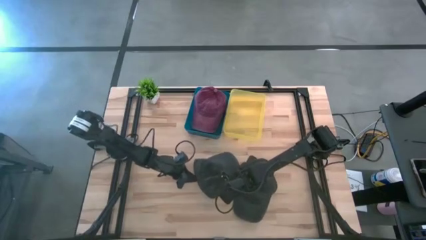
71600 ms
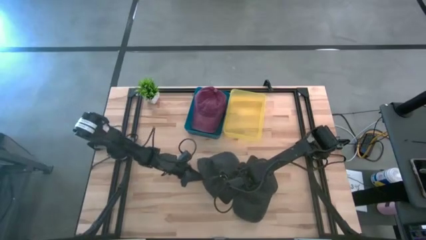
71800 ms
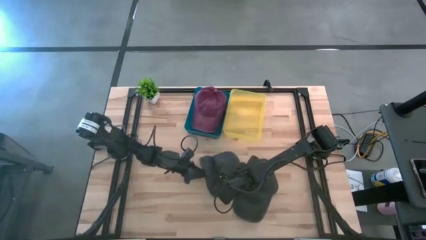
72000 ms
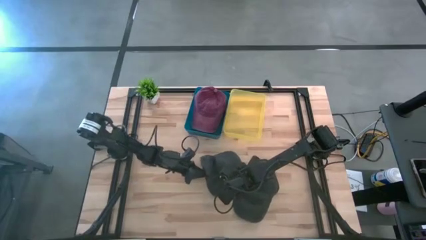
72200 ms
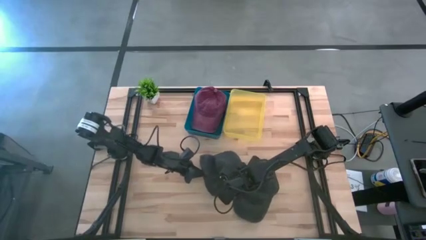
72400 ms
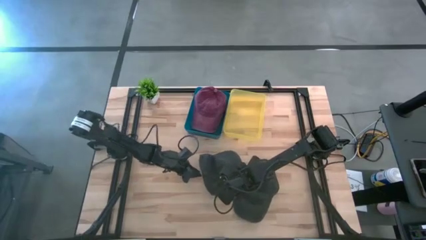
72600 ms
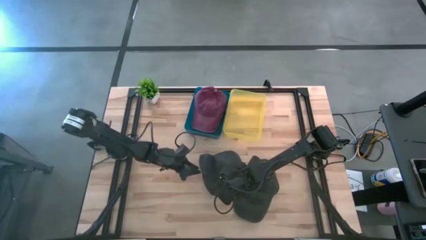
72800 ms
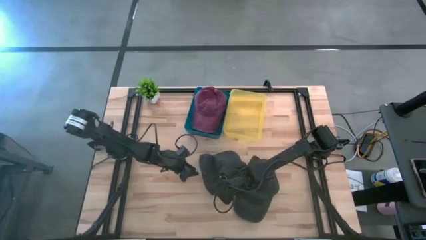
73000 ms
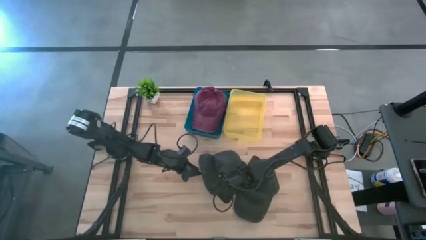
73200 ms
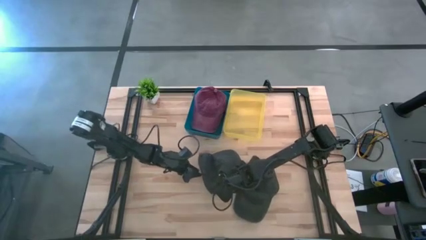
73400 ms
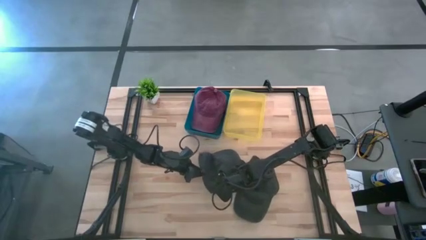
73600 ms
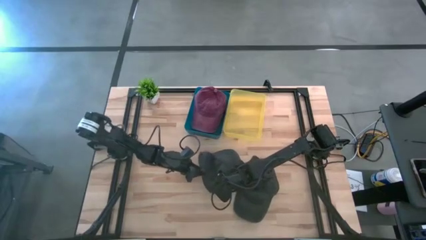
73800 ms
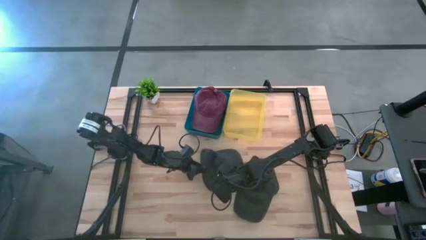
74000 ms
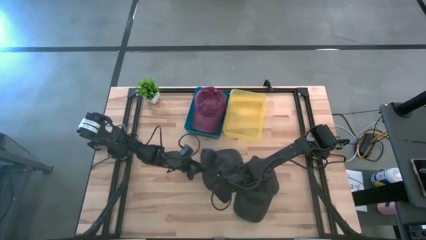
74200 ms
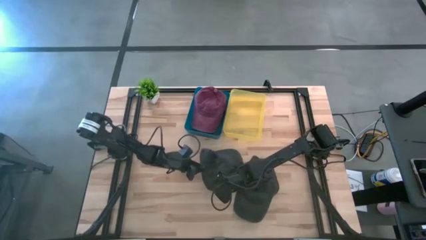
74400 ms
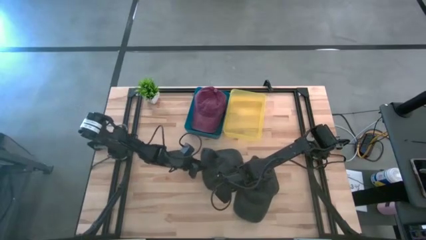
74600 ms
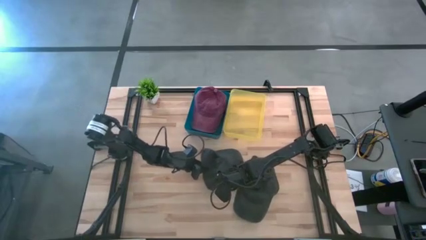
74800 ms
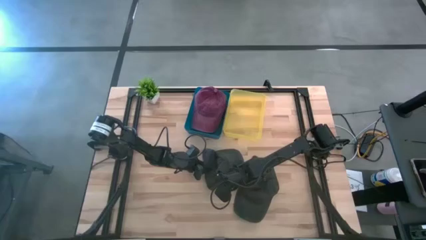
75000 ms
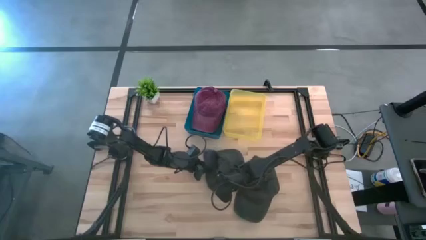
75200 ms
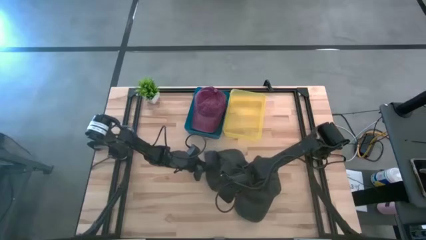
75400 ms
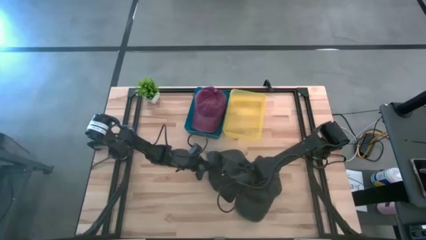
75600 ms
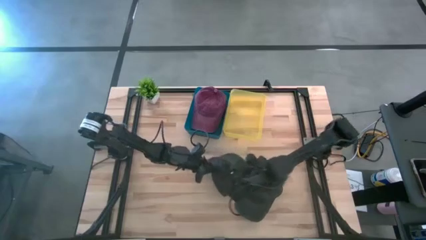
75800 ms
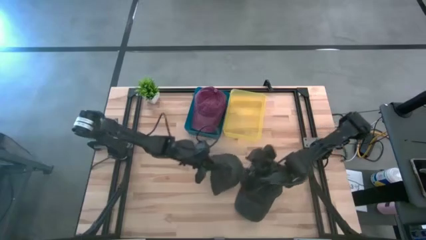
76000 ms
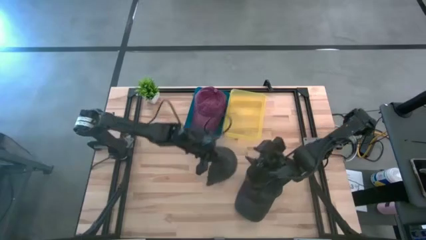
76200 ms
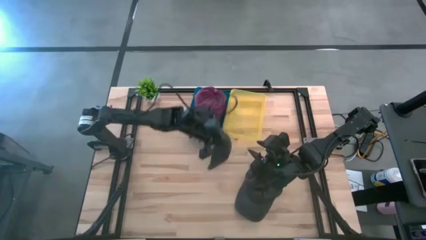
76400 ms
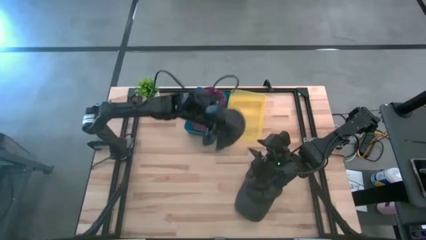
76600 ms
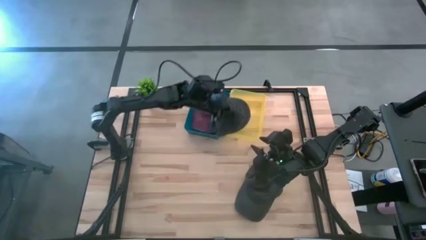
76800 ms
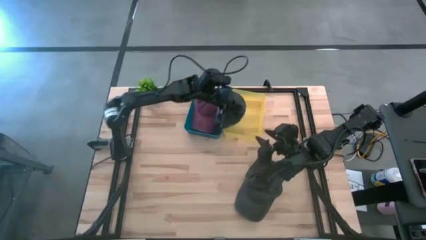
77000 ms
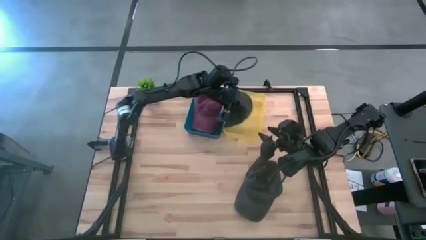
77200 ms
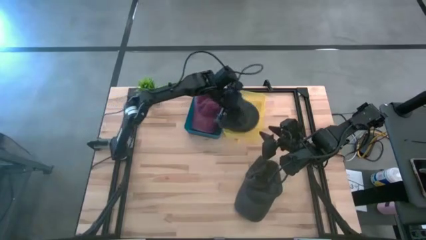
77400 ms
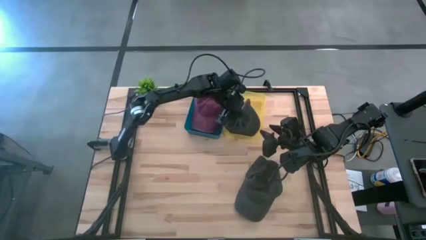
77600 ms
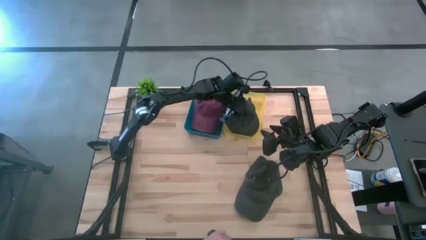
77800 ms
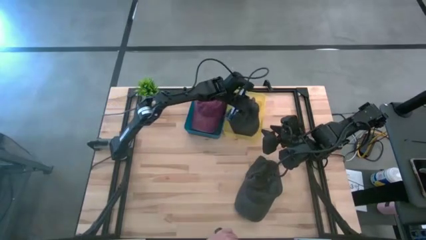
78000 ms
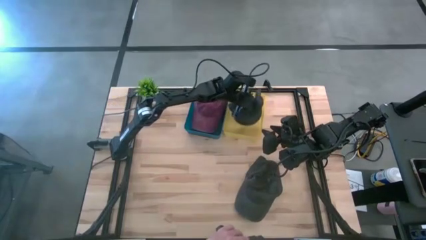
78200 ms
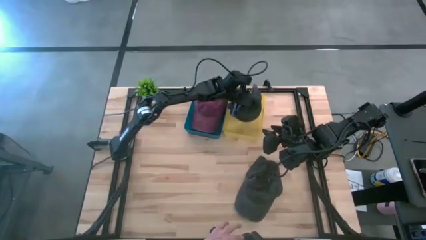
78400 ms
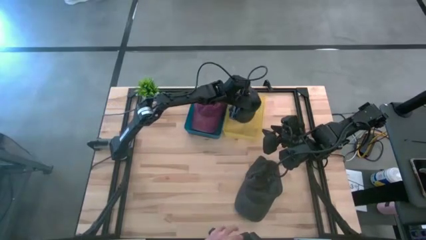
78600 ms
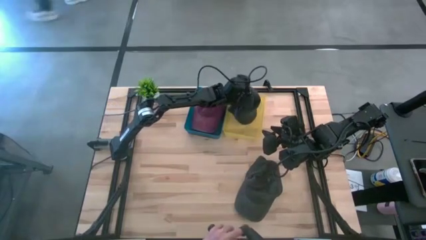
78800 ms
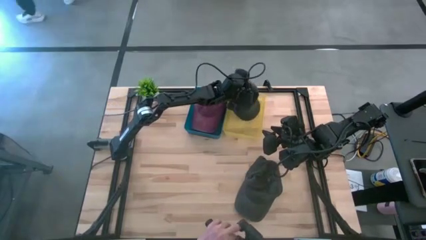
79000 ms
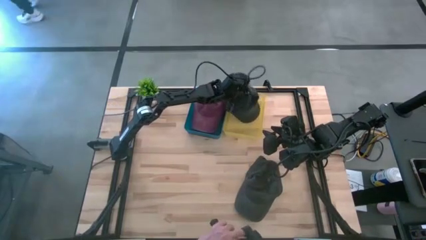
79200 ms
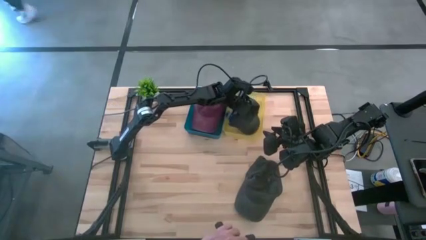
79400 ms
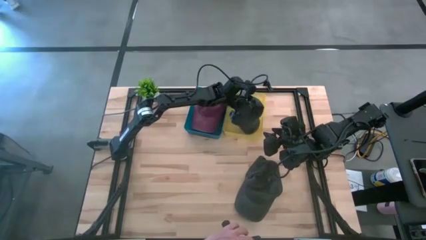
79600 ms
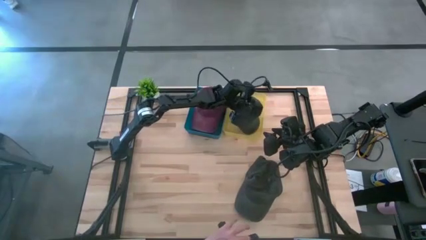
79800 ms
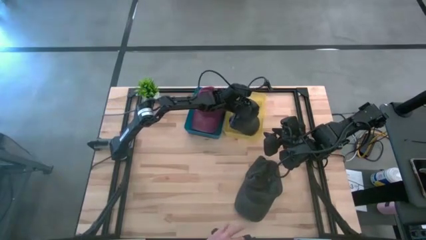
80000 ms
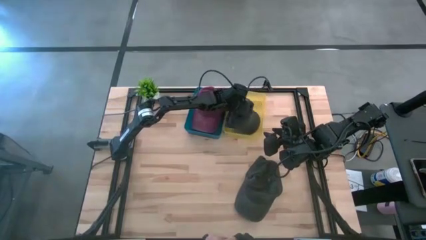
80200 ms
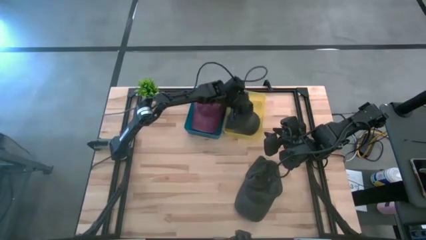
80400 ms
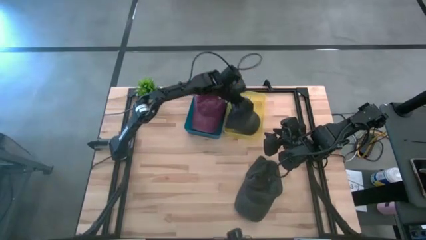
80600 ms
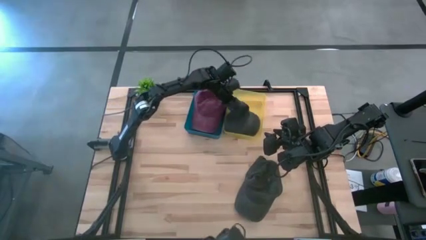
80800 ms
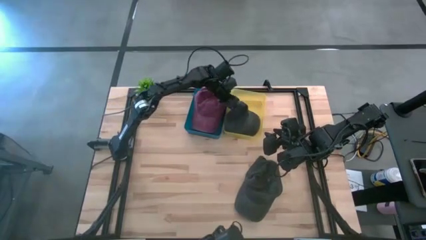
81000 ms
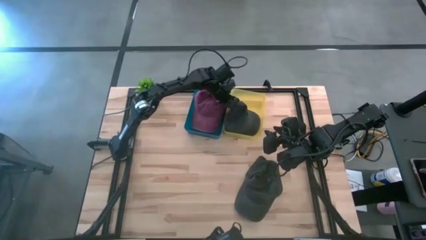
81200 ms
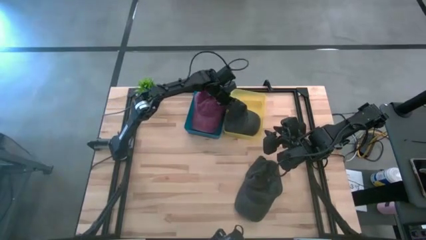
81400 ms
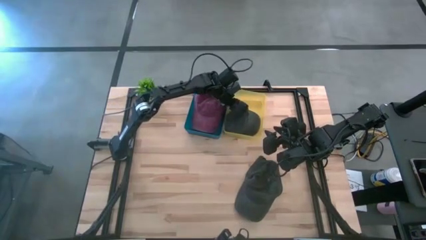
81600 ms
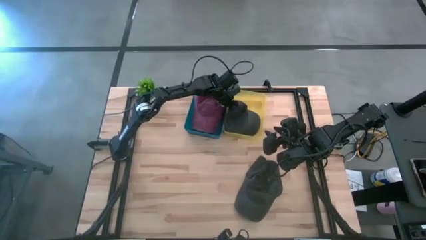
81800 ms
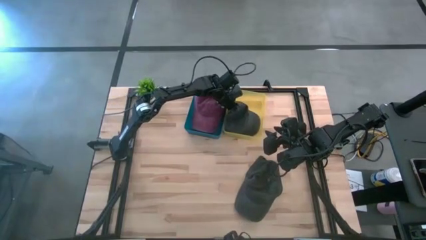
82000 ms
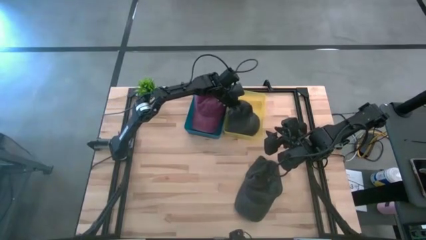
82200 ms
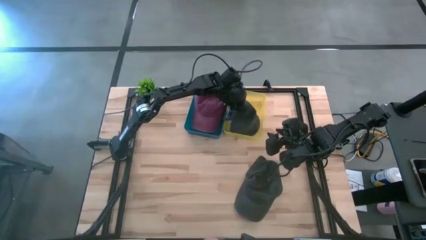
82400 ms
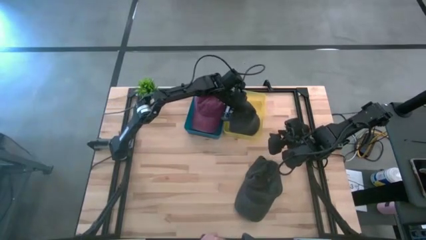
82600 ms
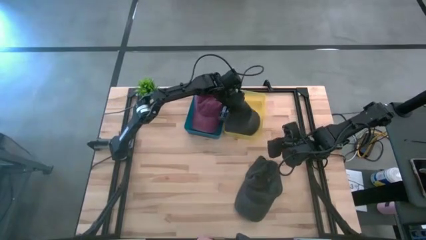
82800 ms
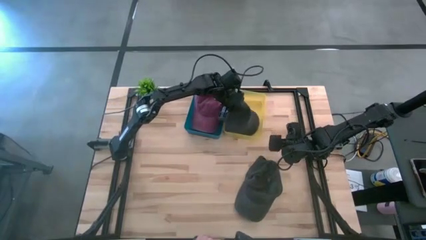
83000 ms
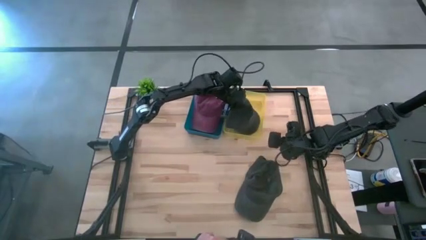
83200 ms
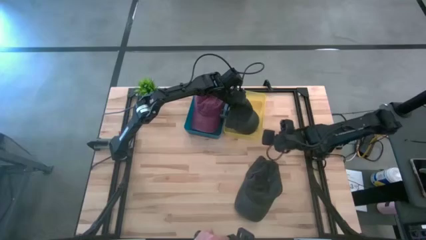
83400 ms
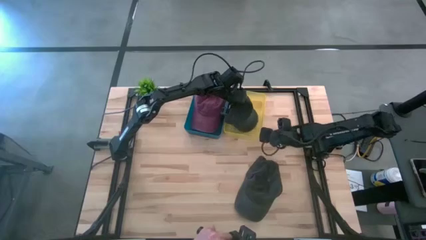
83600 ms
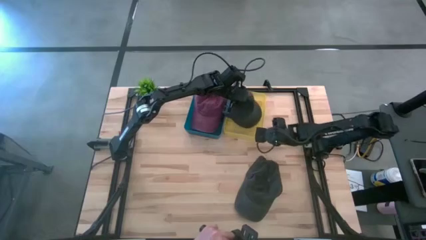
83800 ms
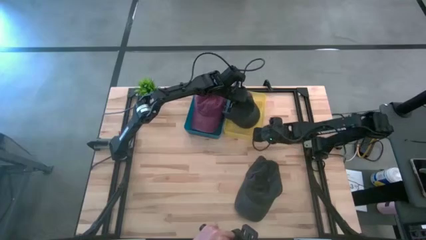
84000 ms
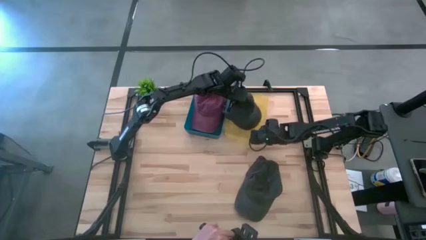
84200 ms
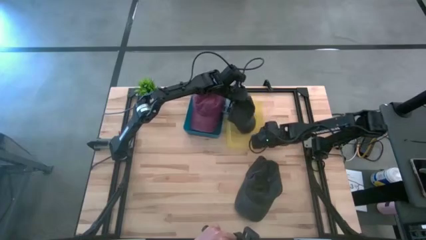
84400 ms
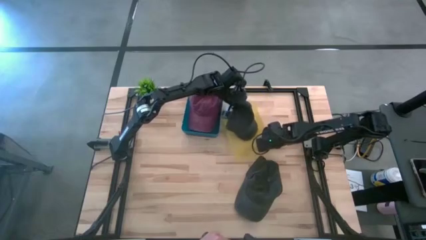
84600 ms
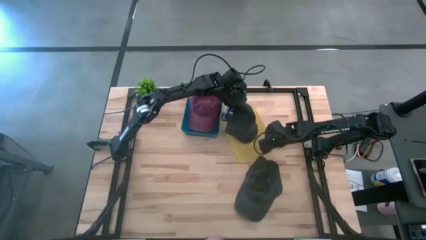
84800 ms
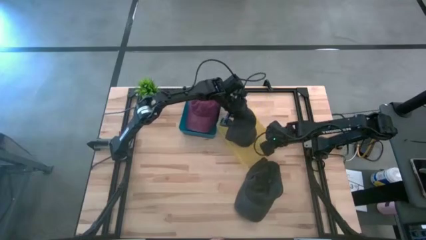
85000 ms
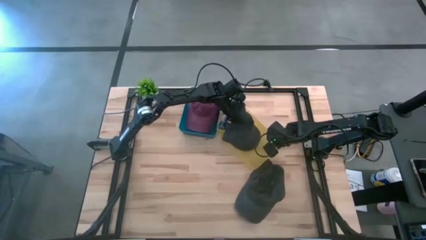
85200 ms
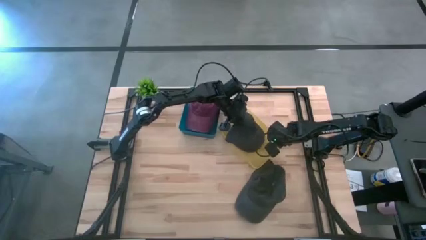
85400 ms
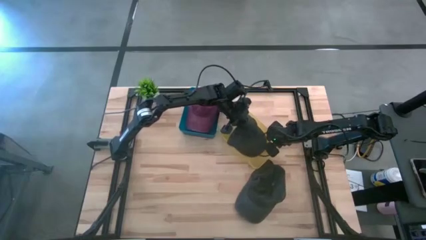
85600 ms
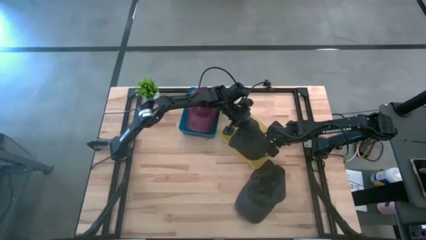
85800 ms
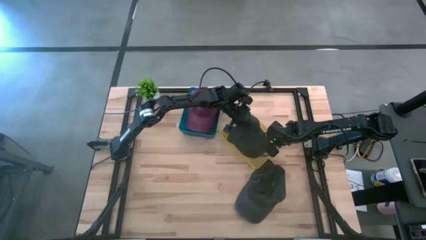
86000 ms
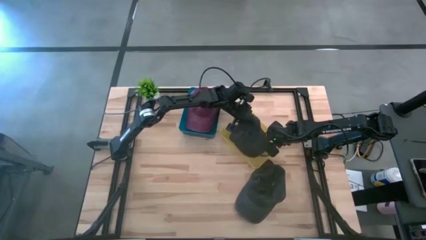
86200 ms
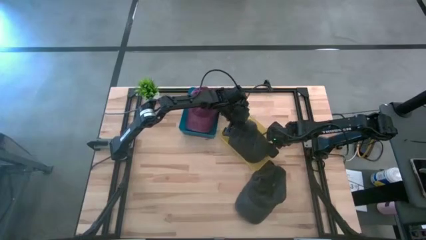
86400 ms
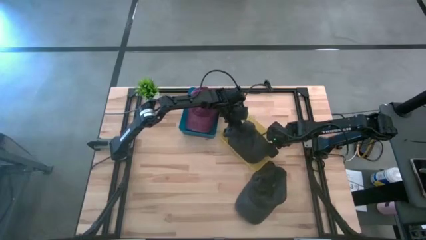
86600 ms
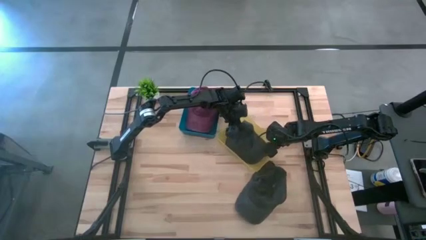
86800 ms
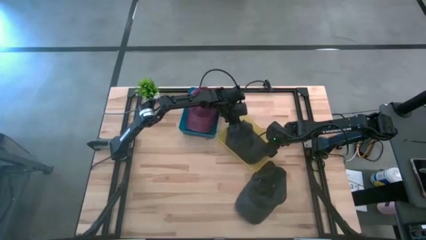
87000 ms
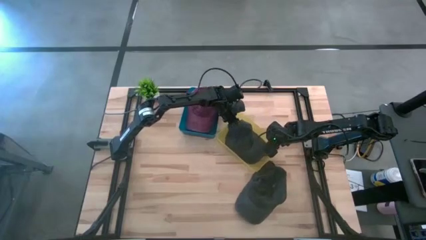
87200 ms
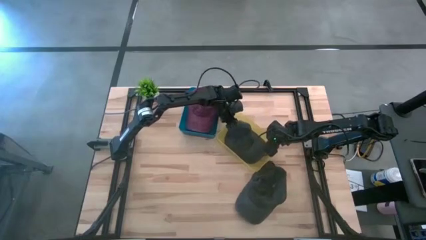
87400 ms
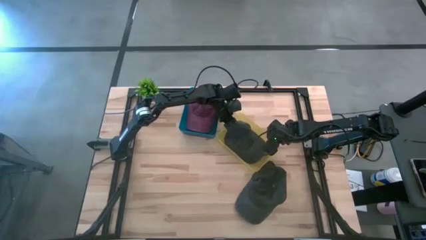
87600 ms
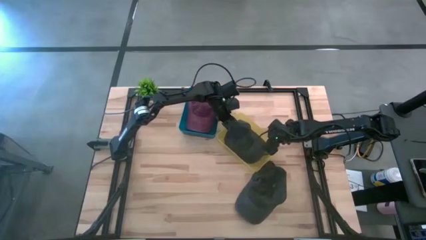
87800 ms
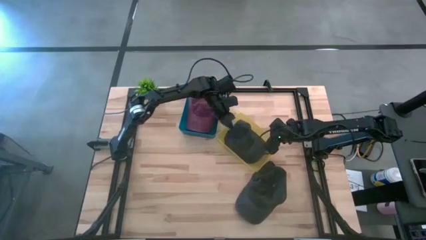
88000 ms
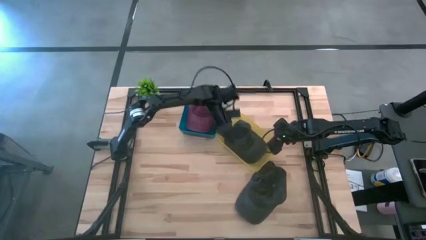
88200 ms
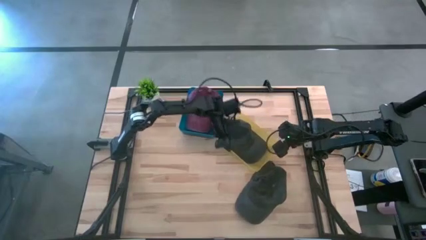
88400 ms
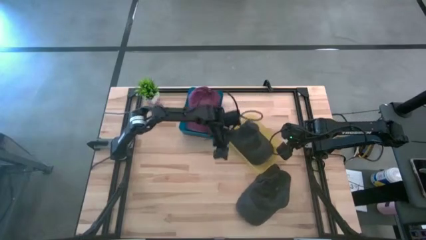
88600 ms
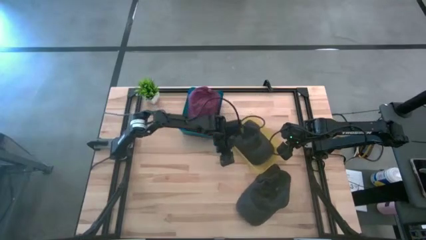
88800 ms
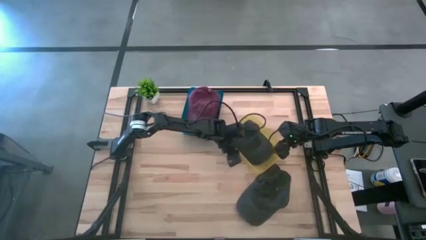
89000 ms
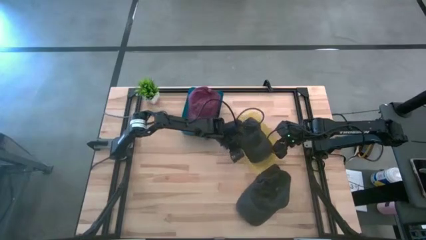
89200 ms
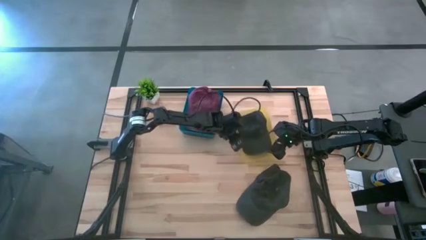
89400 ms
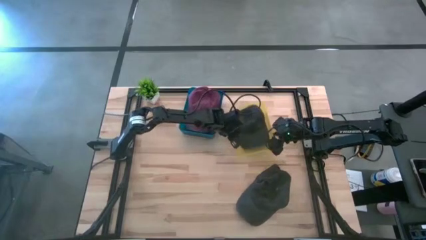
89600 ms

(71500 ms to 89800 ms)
Task: Pick & Place hat
Put the left black cap into the yellow bin
